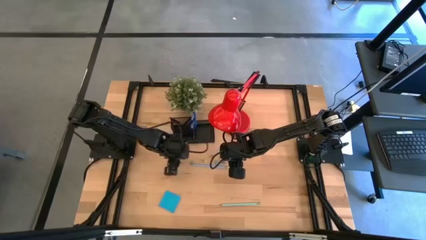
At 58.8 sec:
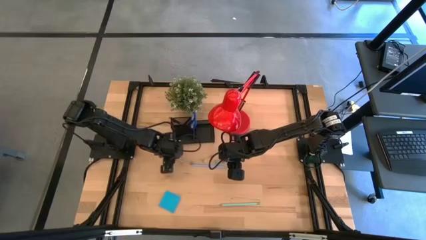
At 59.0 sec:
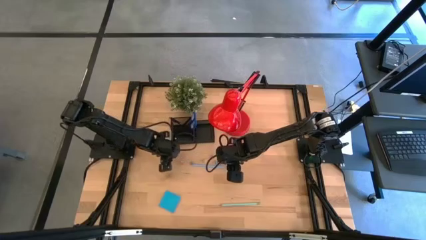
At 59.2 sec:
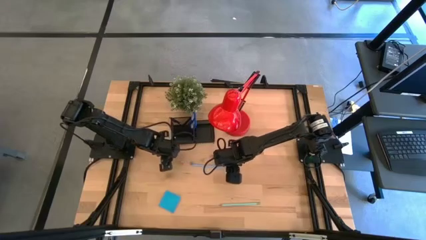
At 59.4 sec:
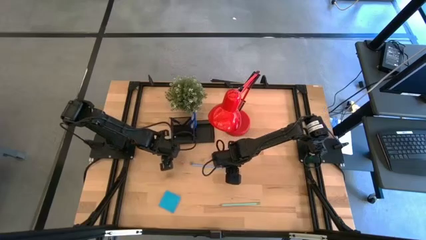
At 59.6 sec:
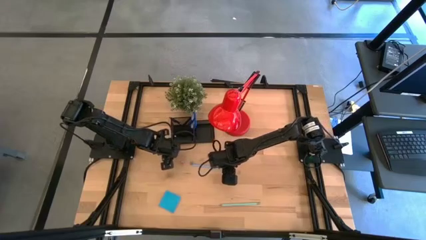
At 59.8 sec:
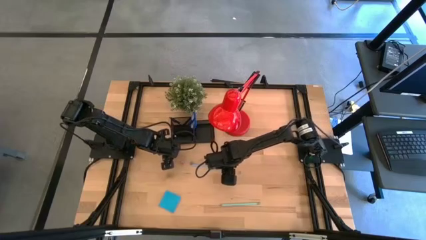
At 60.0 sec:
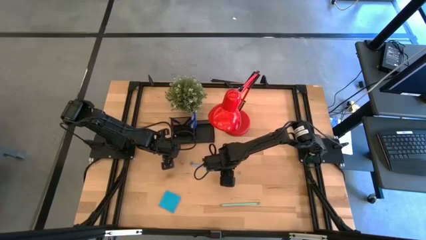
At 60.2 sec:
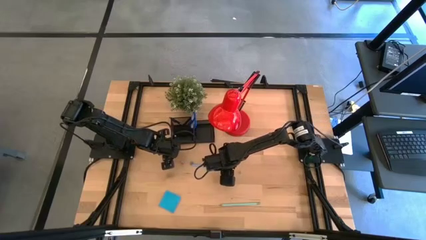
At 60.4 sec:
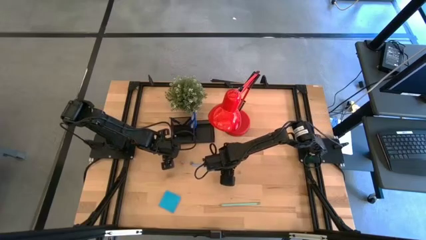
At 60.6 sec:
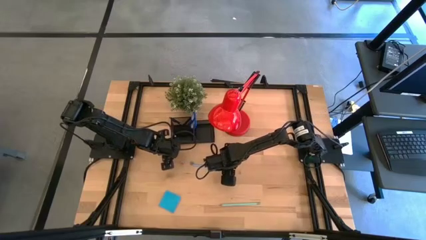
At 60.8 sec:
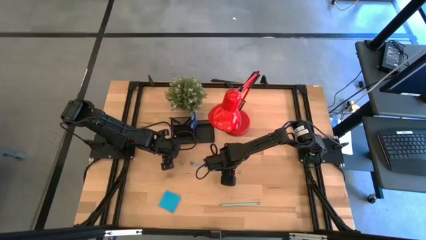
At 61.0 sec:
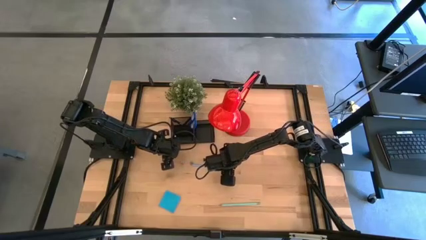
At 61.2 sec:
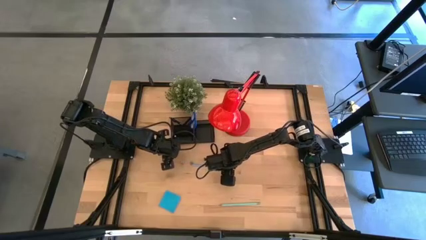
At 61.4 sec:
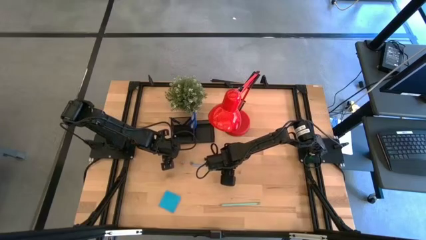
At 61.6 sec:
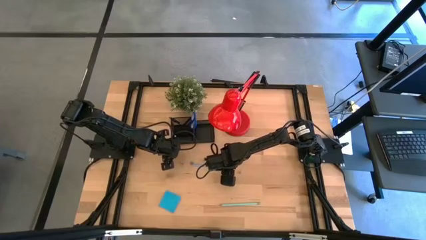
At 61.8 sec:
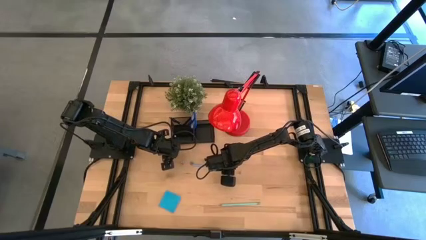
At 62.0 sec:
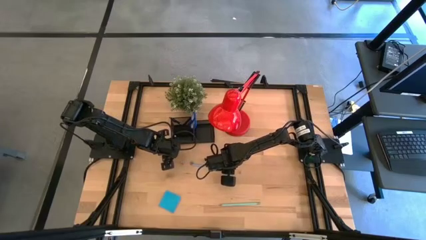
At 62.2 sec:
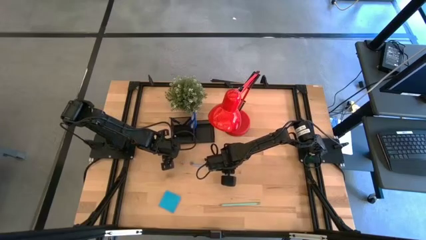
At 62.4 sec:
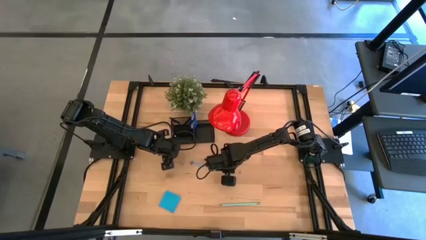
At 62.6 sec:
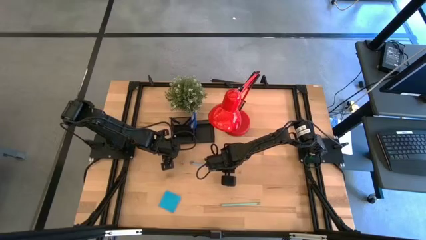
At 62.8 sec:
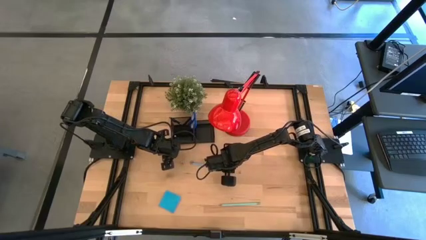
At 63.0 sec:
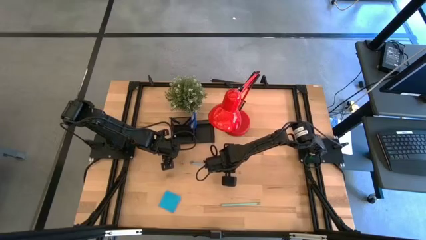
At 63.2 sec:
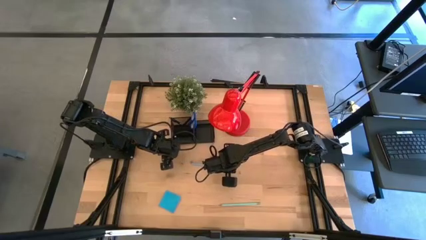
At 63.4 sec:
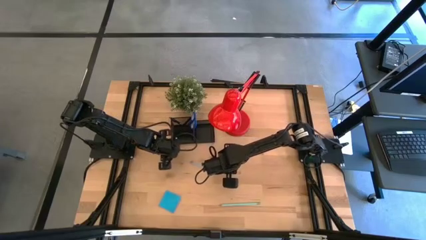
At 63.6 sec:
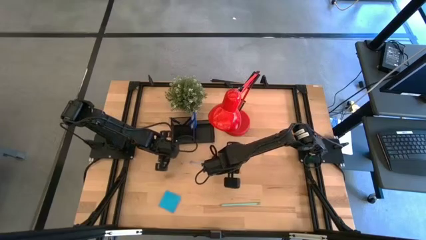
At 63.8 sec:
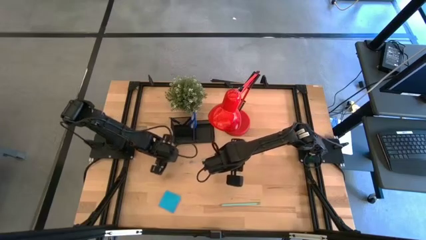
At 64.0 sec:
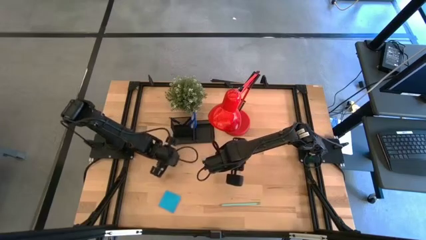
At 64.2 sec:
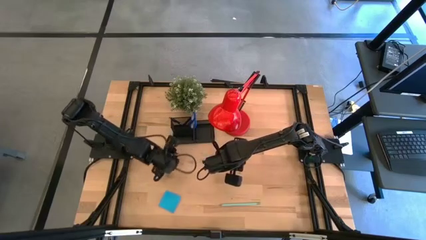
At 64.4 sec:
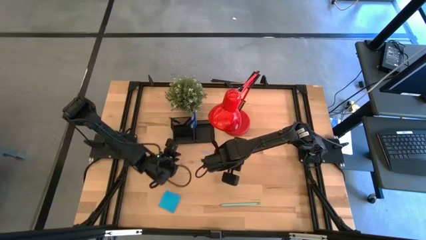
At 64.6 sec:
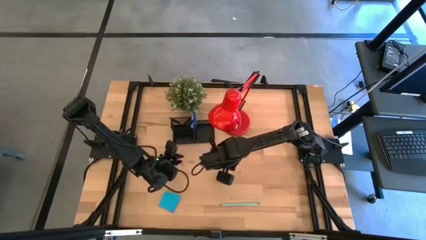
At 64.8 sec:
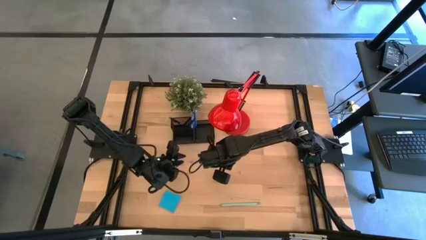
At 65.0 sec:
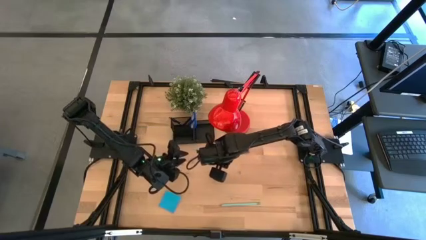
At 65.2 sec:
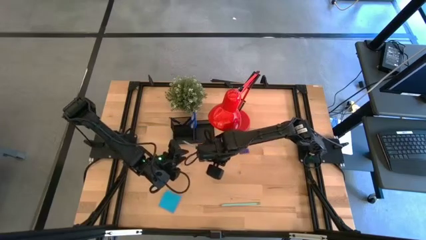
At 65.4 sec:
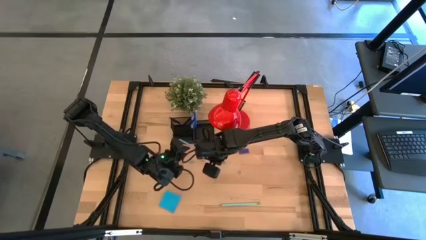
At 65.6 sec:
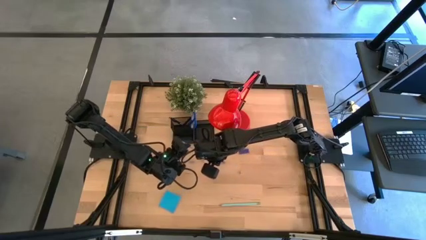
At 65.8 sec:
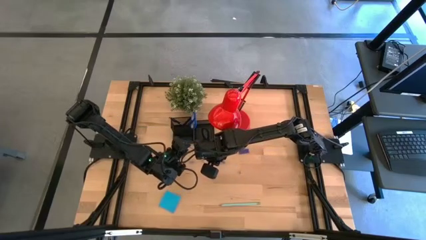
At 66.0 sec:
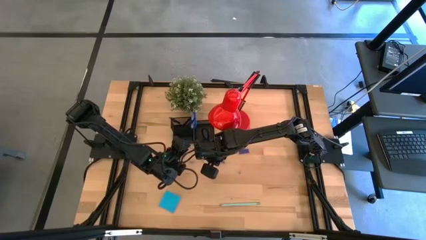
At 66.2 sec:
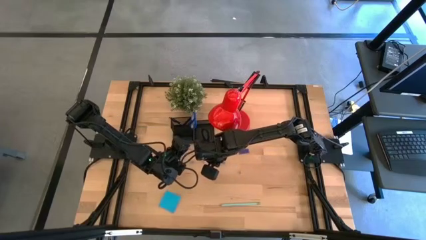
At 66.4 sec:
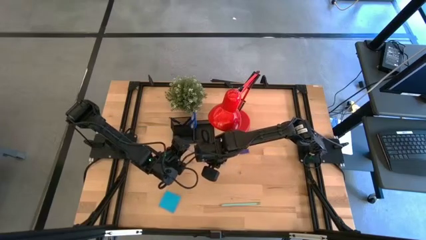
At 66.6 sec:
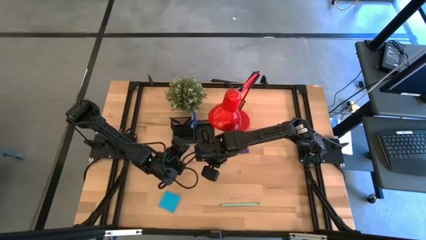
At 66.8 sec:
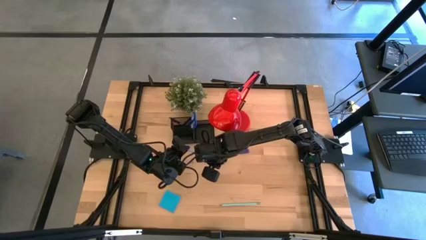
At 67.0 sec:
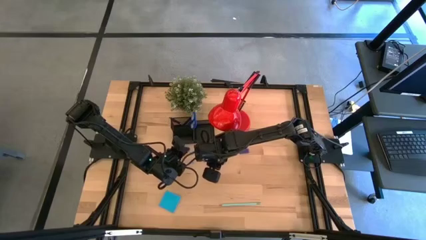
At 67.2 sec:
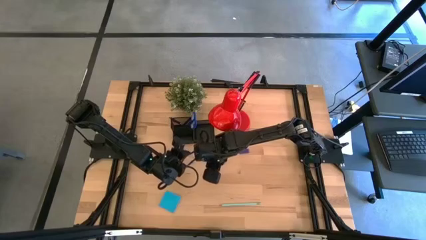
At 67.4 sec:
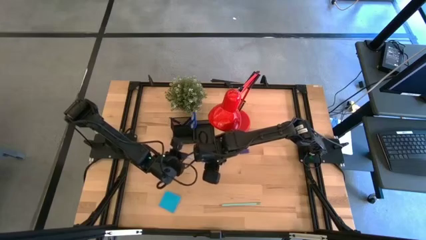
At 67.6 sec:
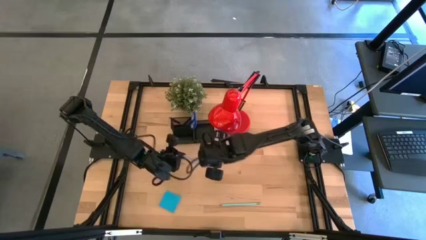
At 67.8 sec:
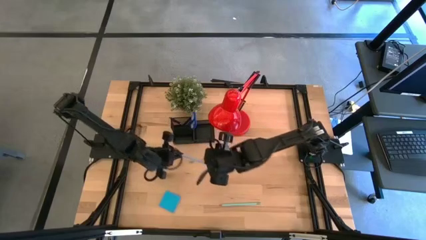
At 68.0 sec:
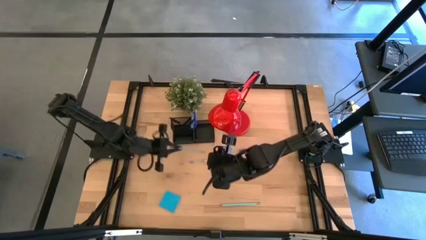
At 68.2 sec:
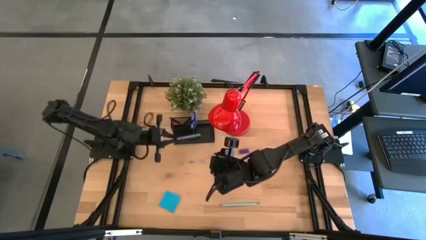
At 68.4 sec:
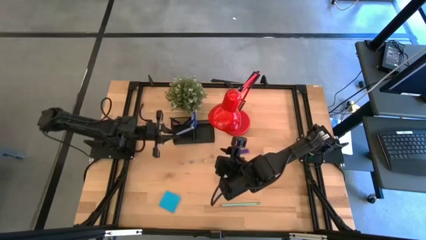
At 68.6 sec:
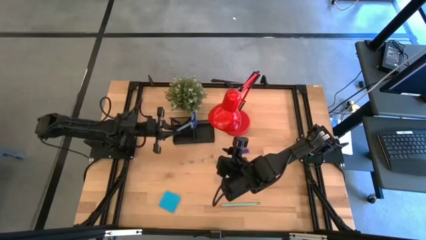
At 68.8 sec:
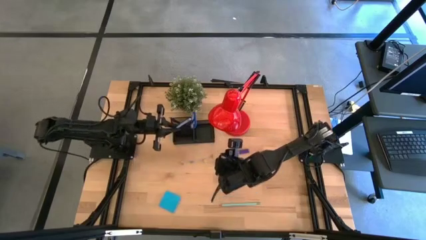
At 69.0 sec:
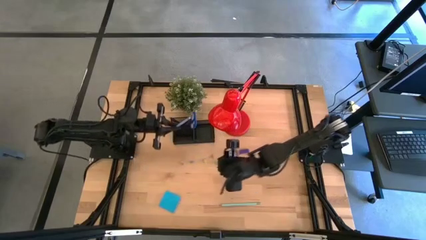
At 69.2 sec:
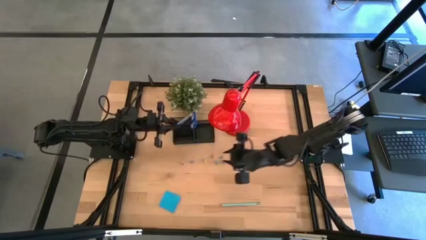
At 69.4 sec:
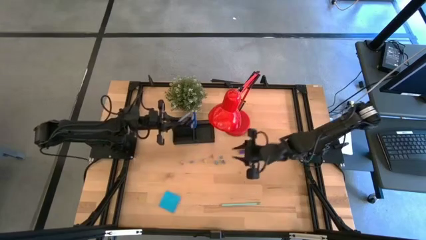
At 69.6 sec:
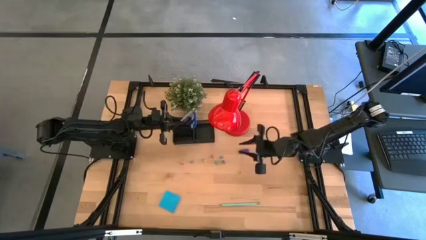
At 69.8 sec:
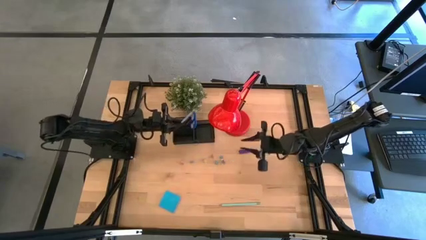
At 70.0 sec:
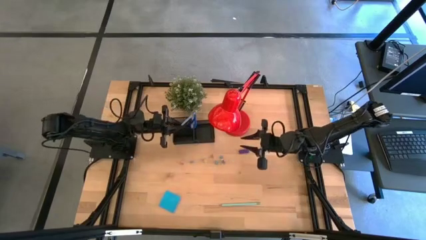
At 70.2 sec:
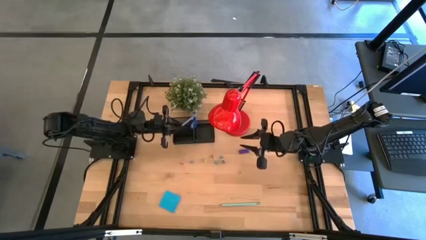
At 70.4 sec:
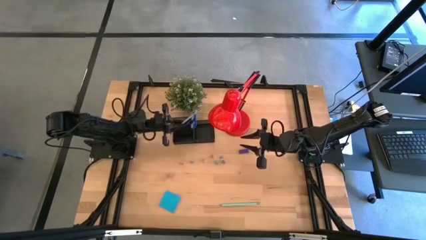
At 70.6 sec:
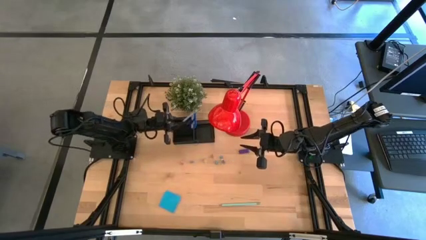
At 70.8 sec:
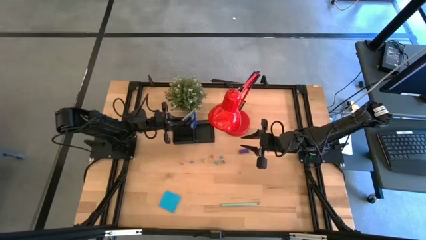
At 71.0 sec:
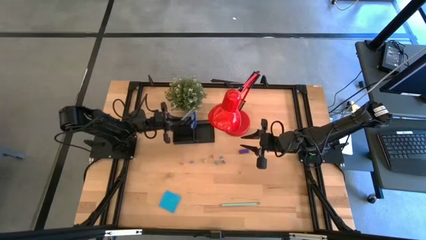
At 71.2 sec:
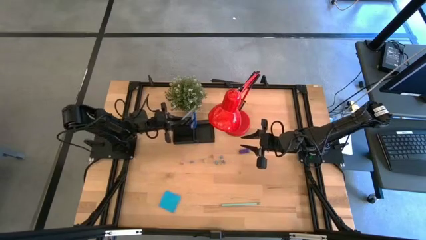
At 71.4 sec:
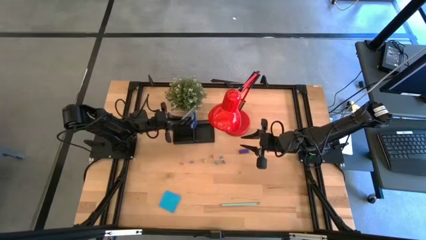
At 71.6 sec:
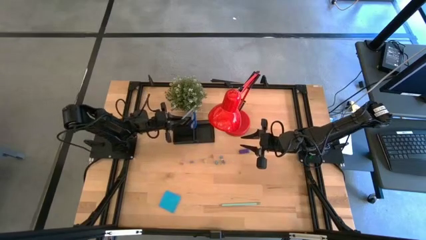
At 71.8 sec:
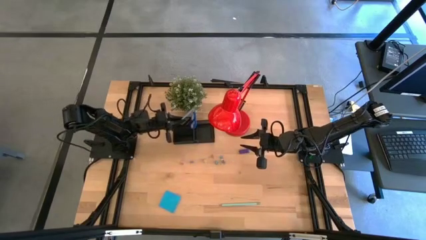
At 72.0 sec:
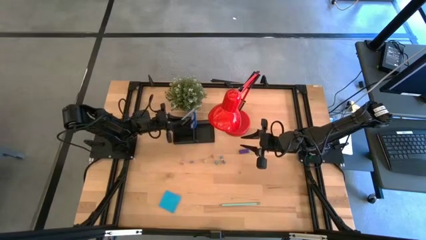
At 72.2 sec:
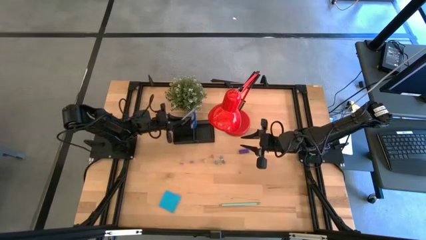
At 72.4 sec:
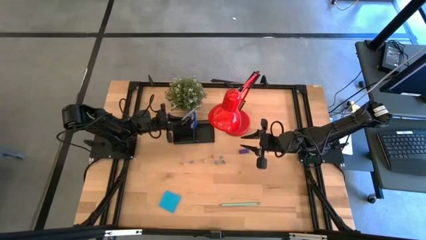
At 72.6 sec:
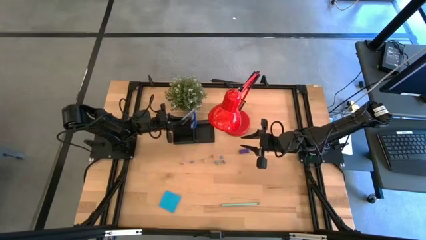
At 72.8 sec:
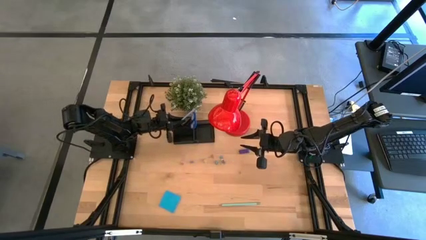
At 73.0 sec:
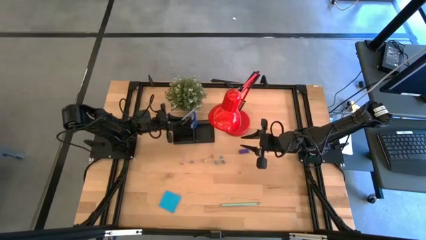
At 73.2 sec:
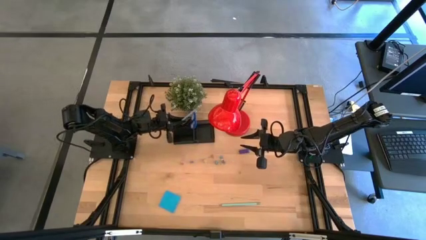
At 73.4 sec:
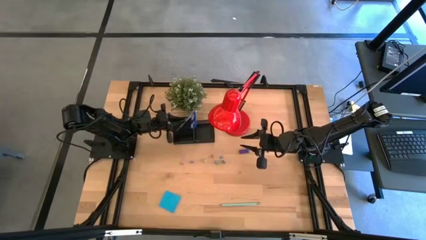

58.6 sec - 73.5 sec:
Task: Pick and place office supplies into organizer
Put the blue pencil into the black desk organizer
